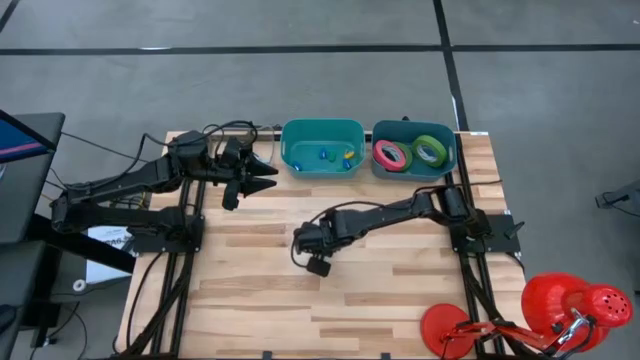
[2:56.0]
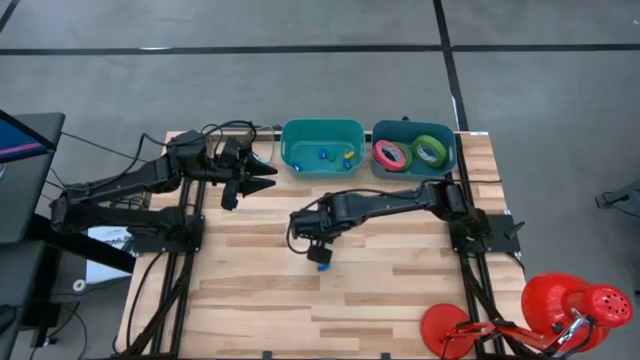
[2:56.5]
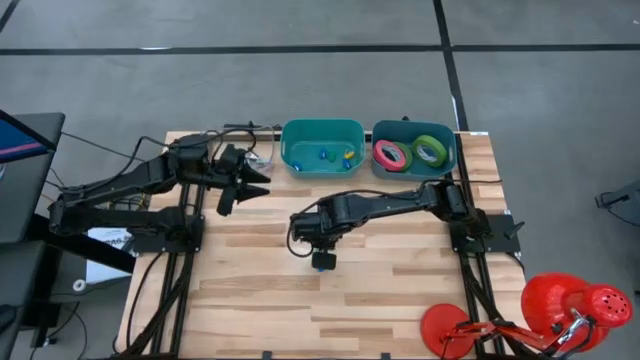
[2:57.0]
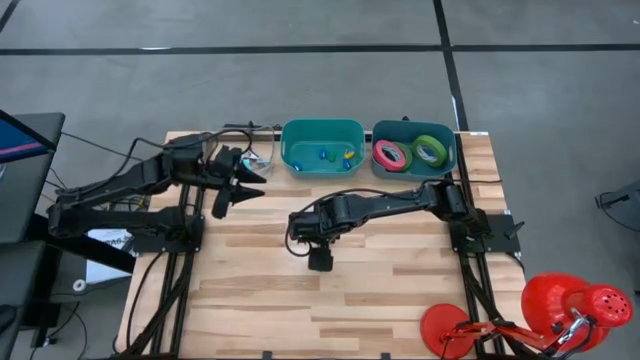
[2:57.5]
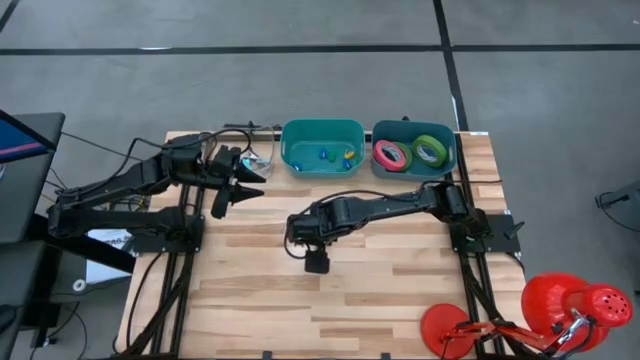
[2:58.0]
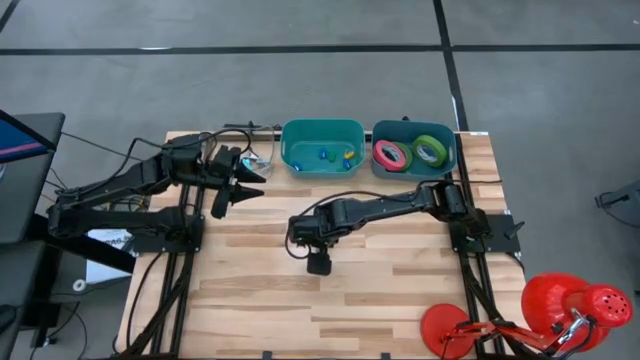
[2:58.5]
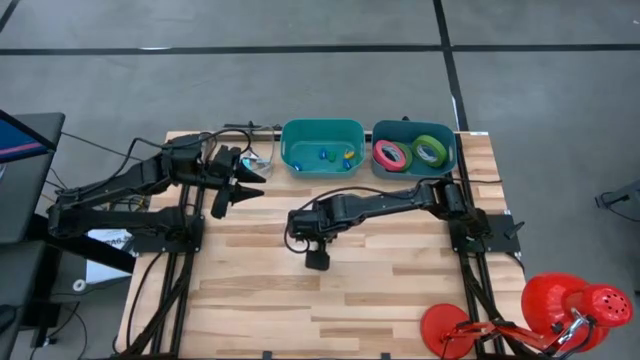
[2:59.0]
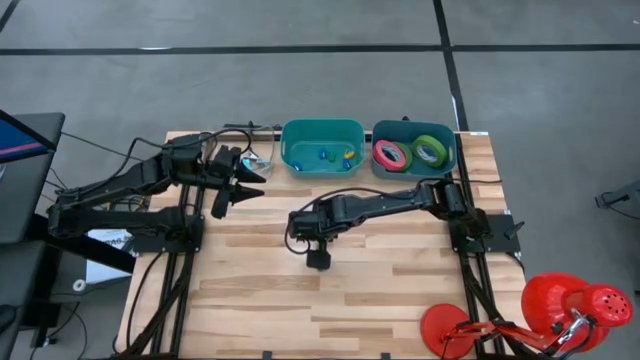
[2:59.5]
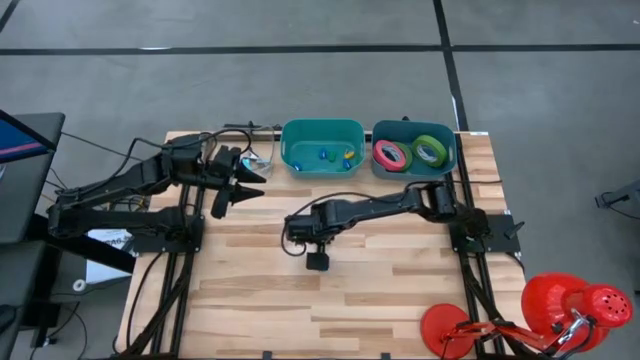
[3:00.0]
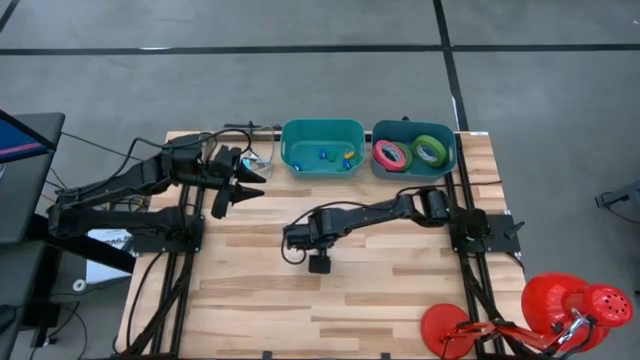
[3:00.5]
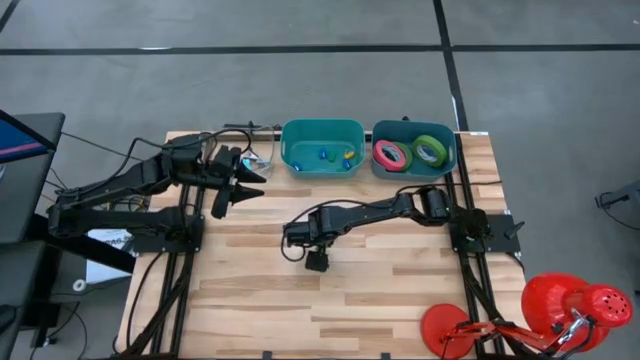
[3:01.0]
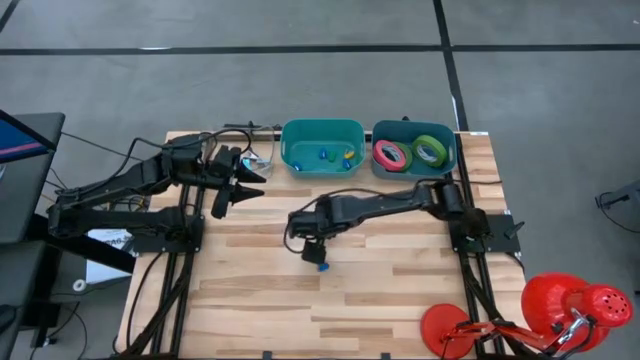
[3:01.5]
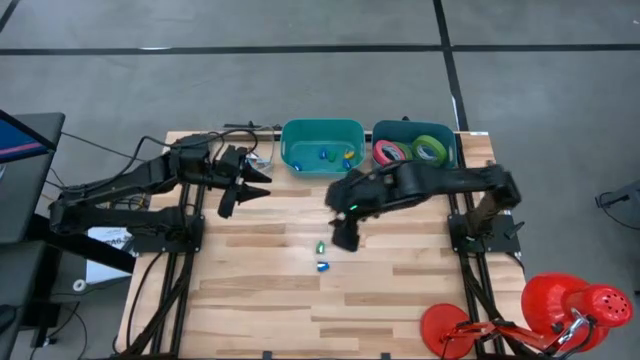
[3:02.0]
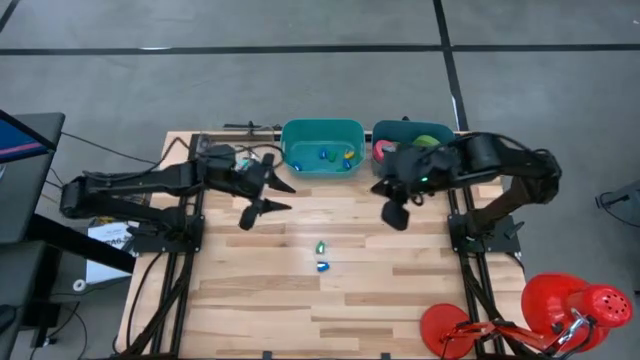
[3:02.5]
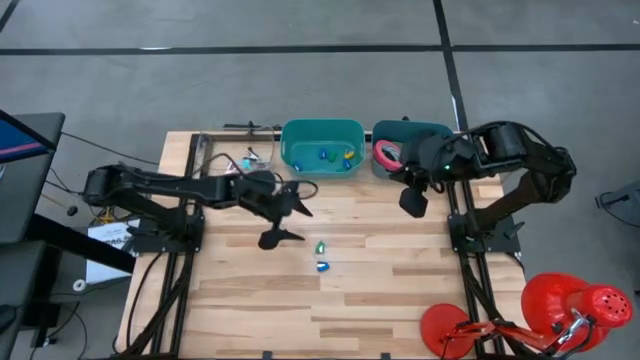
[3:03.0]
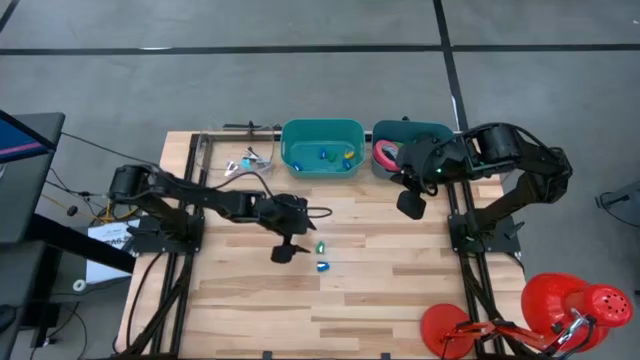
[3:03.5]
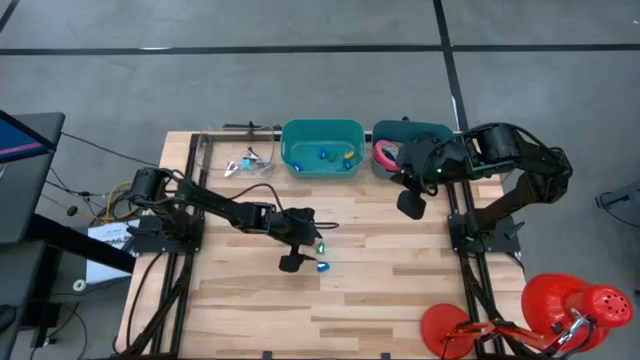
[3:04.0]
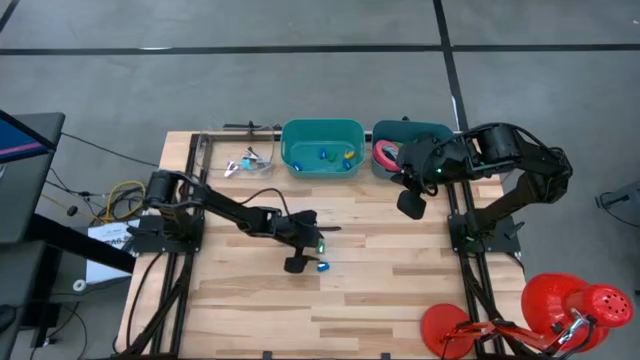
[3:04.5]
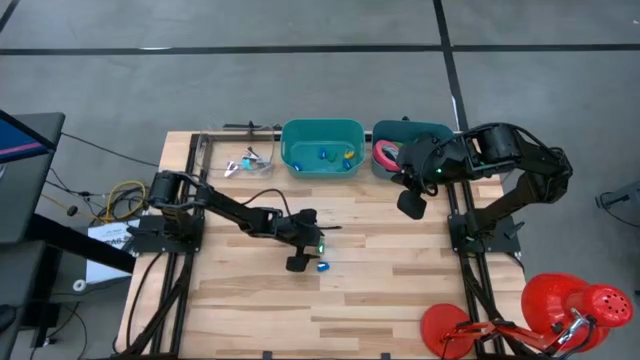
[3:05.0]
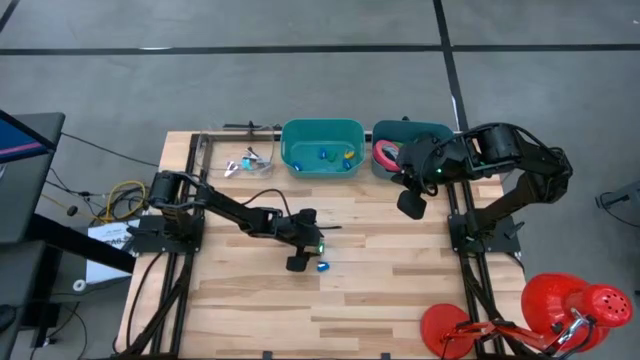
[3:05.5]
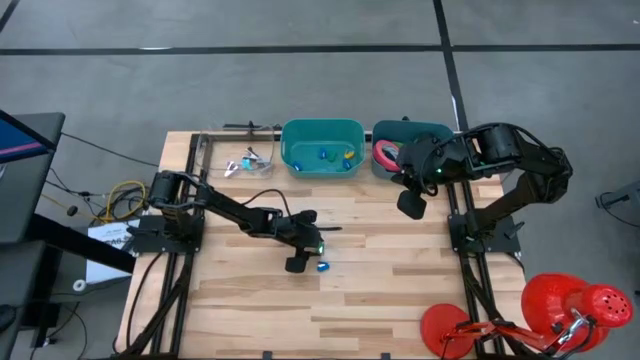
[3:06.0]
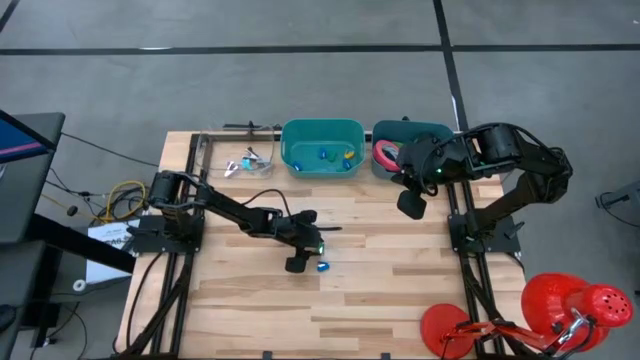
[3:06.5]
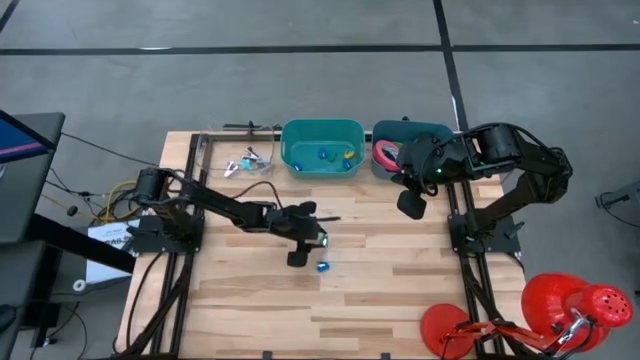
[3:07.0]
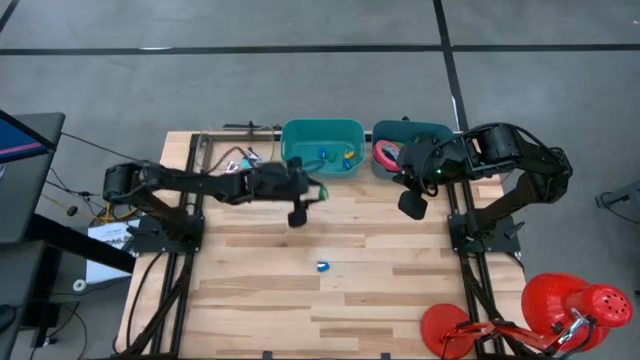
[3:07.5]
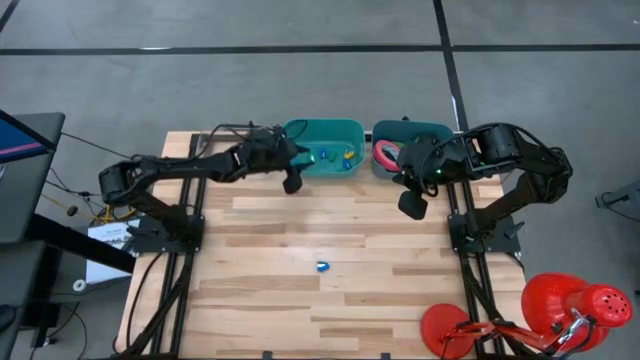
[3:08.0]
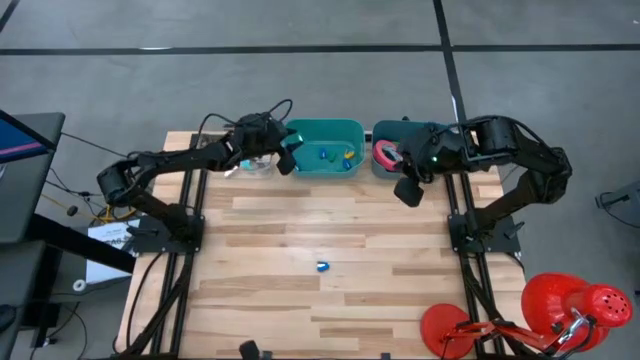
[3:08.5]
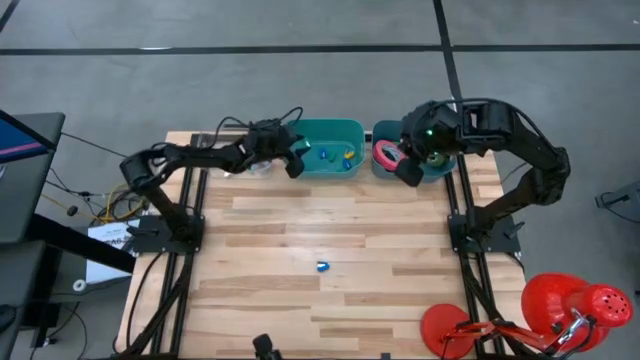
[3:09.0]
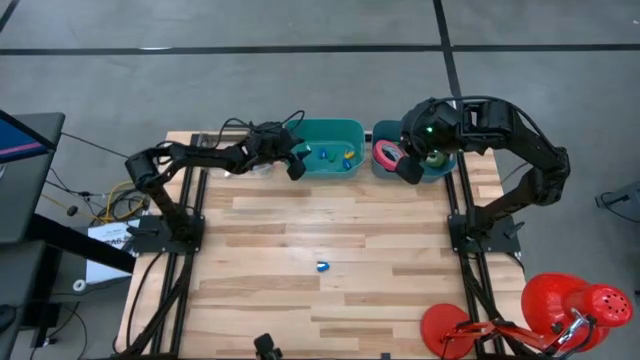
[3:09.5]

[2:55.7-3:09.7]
Task: Pick and place Stapler, Stapler remover, tape
Put the green stapler into the green bin

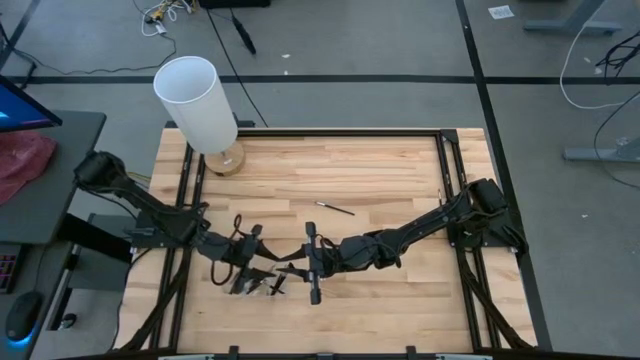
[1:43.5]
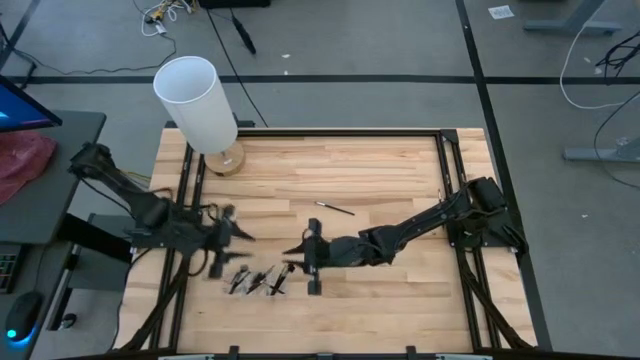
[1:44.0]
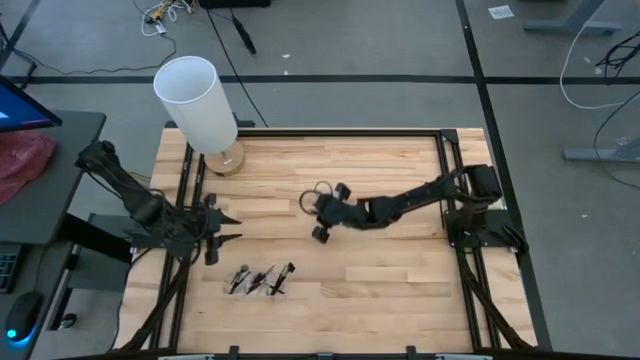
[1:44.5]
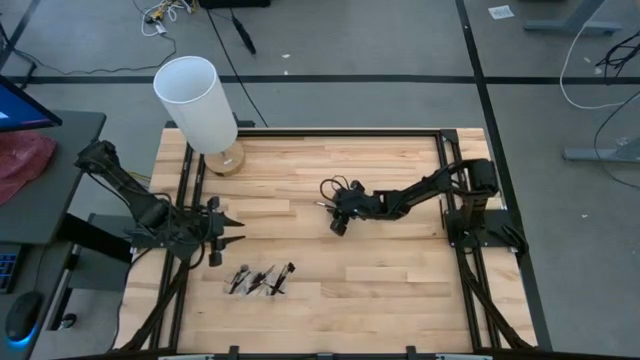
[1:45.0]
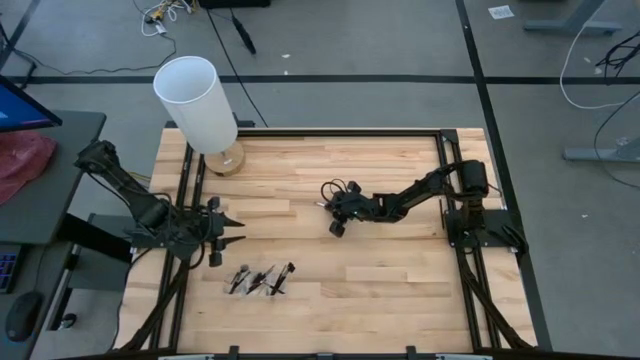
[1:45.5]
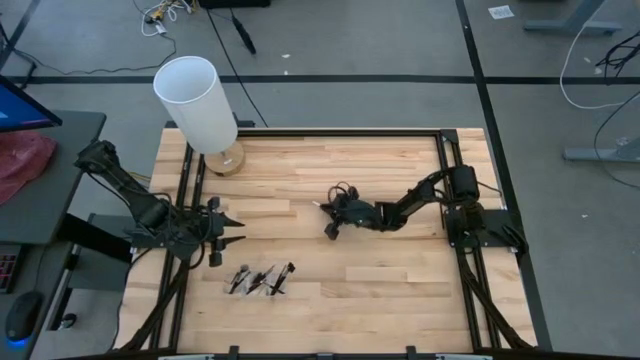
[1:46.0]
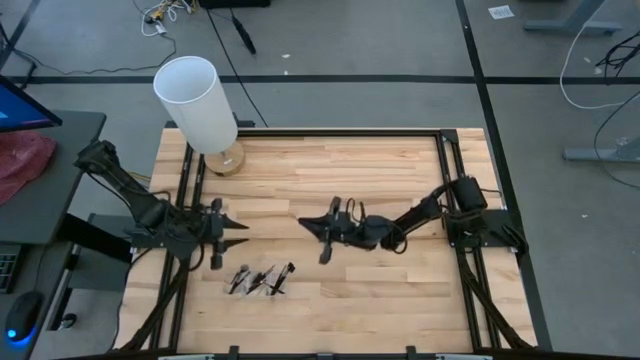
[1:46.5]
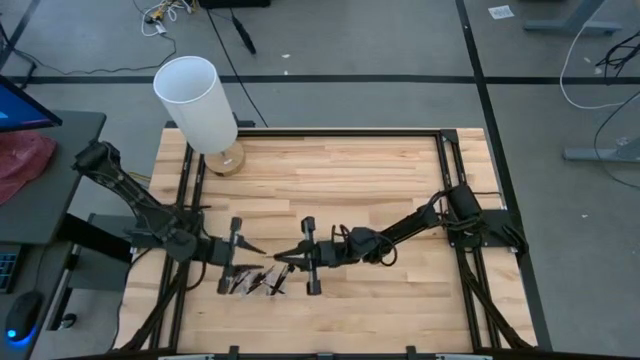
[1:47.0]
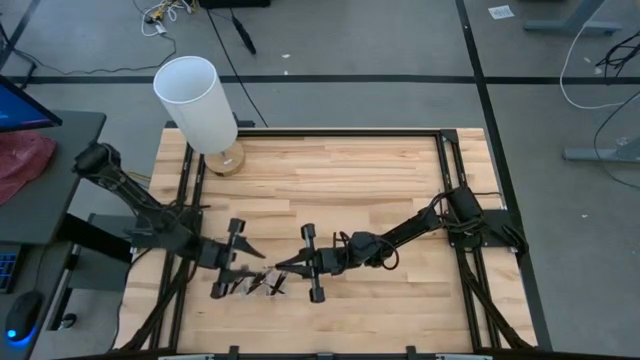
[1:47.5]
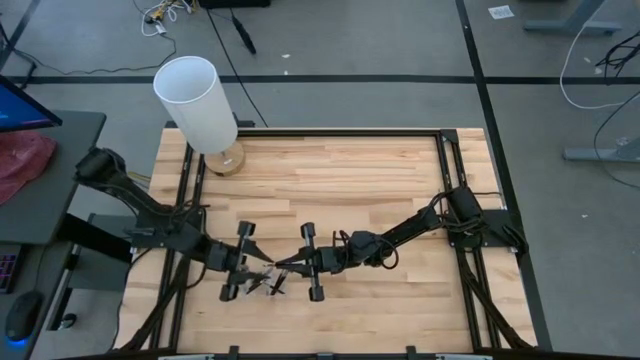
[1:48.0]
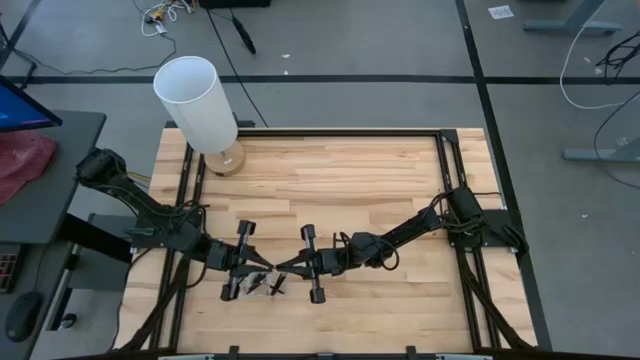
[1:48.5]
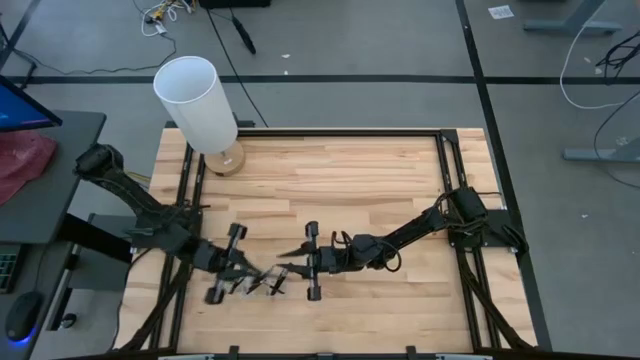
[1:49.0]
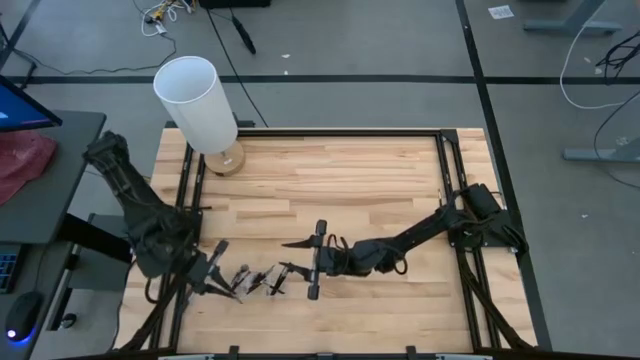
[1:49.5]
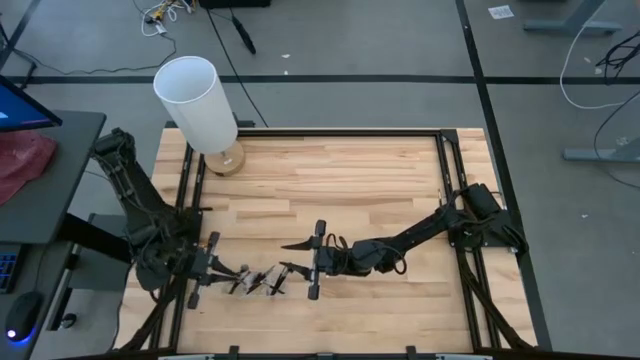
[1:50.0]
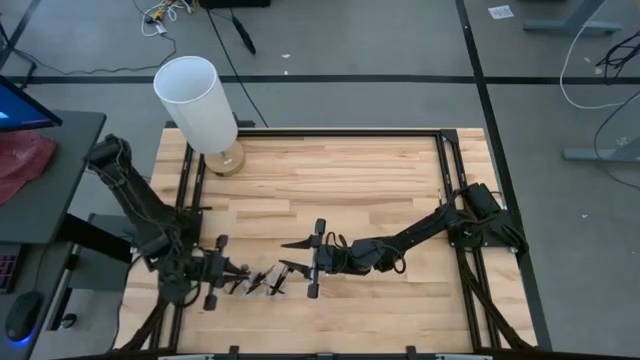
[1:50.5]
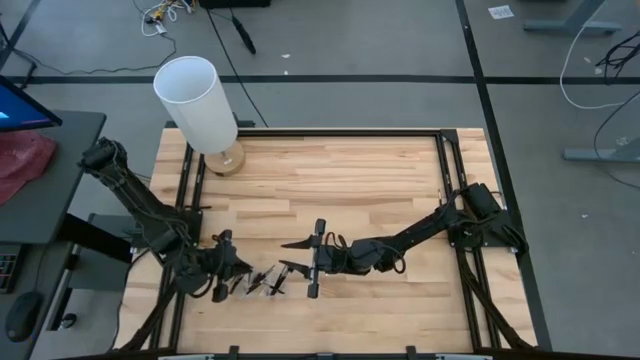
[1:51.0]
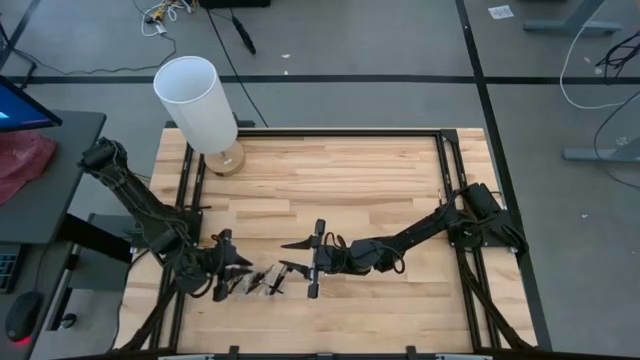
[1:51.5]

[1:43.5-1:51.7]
Task: Put items in baskets/containers
Put the eyeshadow brush into the transparent organizer
